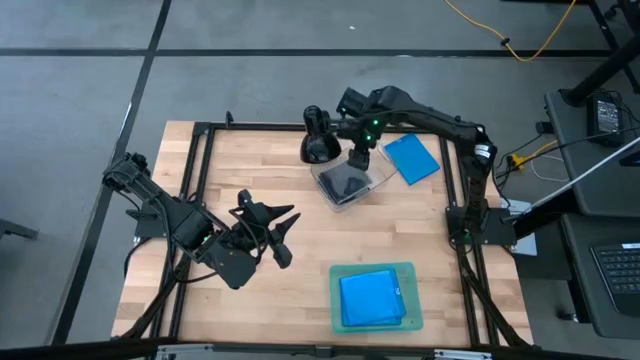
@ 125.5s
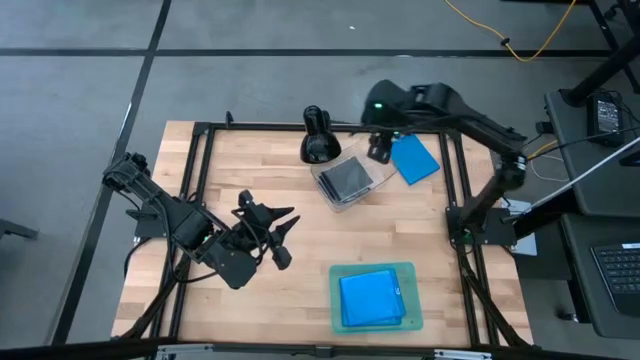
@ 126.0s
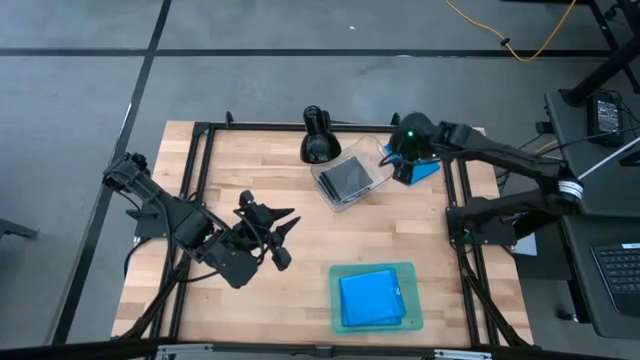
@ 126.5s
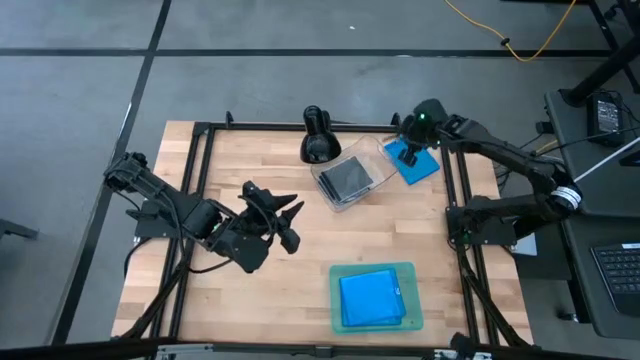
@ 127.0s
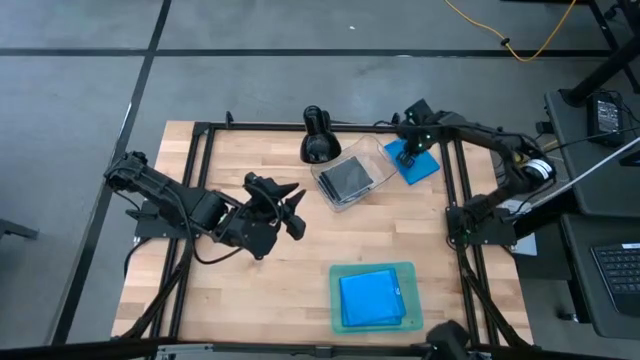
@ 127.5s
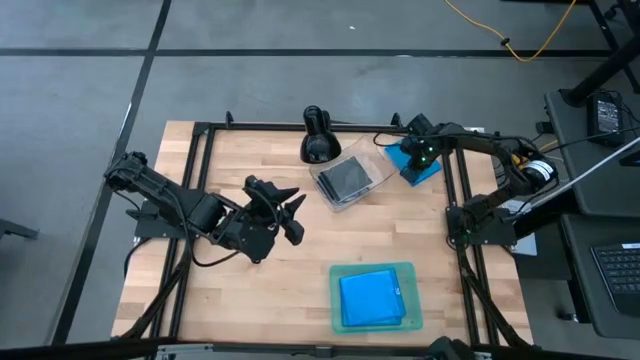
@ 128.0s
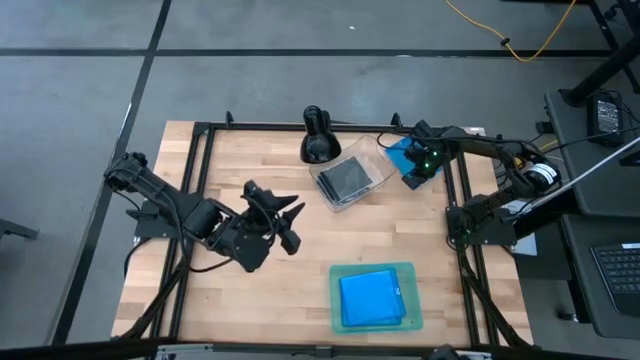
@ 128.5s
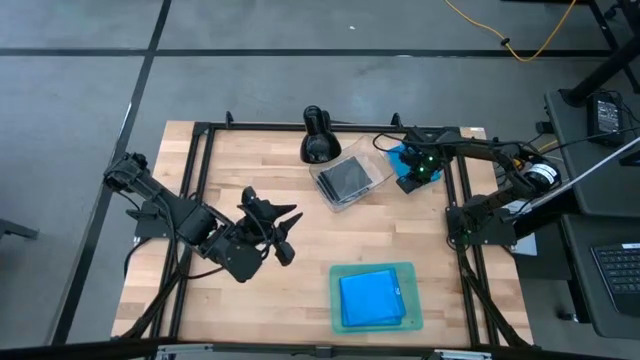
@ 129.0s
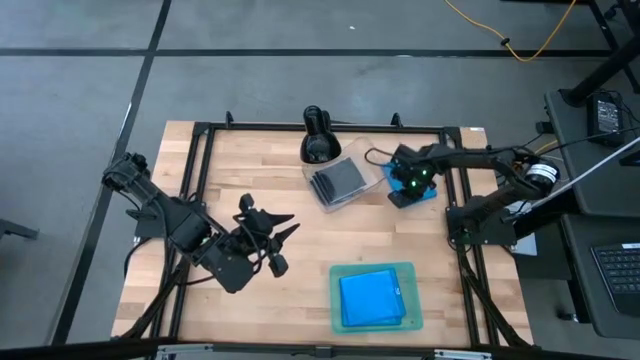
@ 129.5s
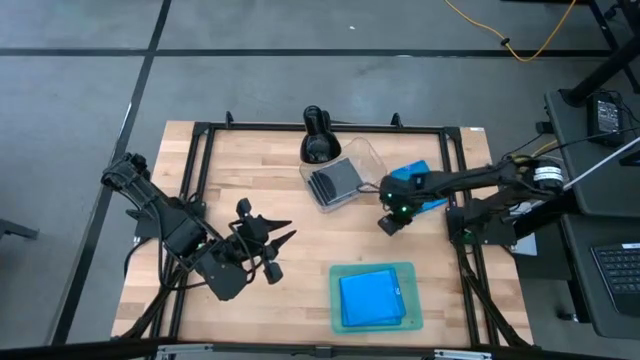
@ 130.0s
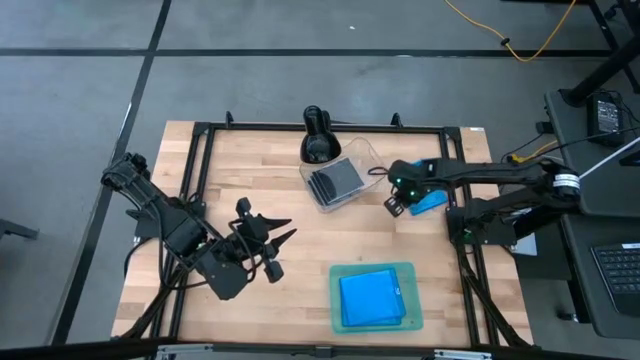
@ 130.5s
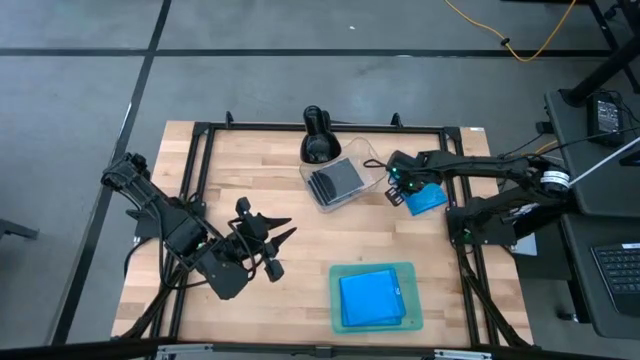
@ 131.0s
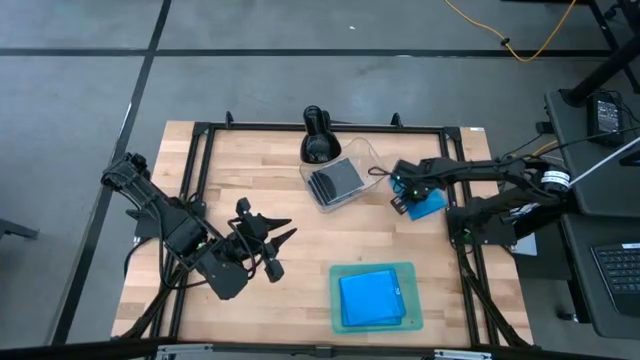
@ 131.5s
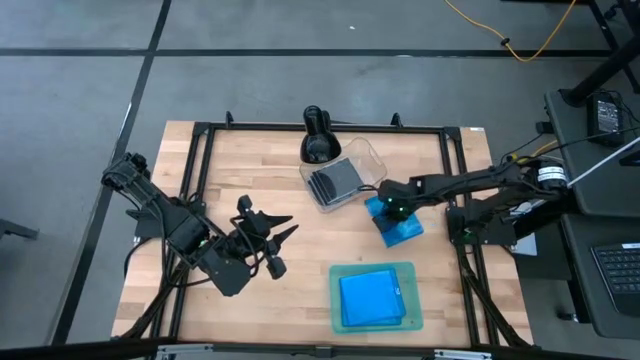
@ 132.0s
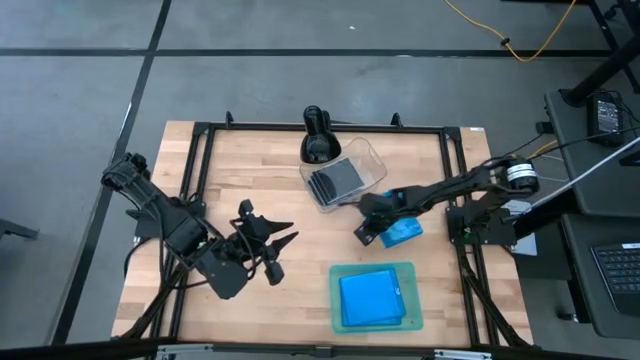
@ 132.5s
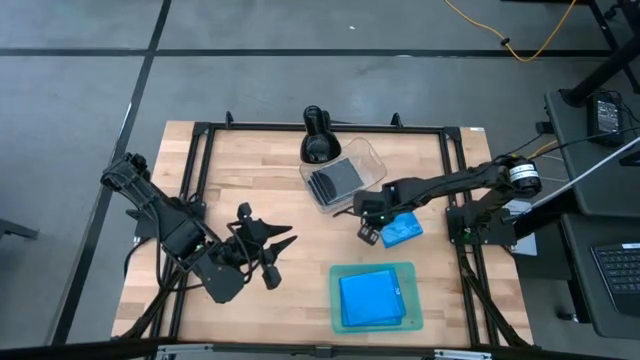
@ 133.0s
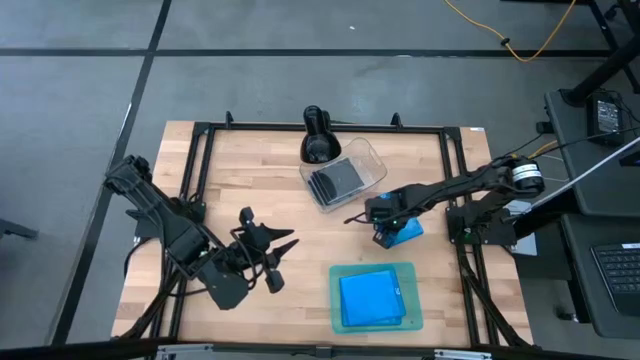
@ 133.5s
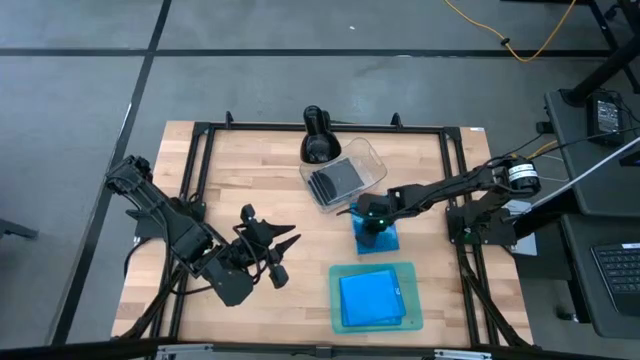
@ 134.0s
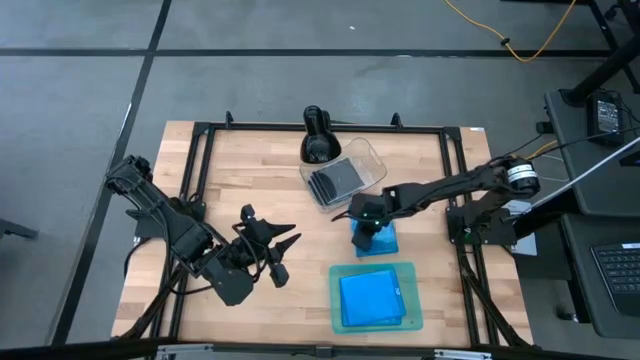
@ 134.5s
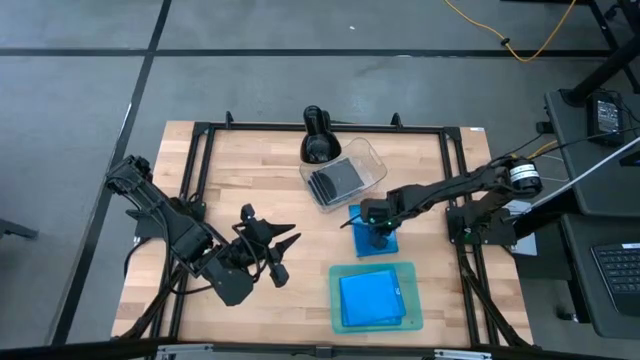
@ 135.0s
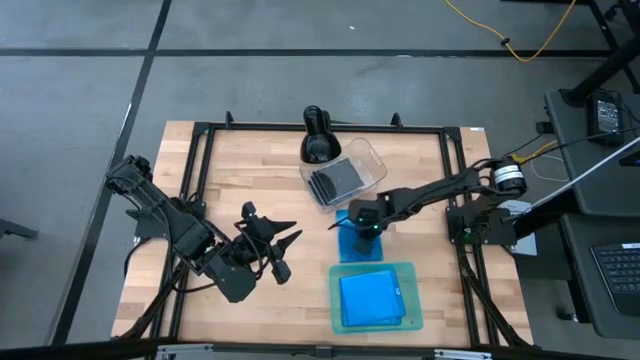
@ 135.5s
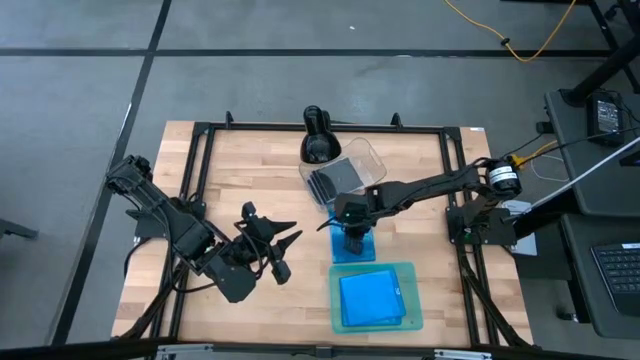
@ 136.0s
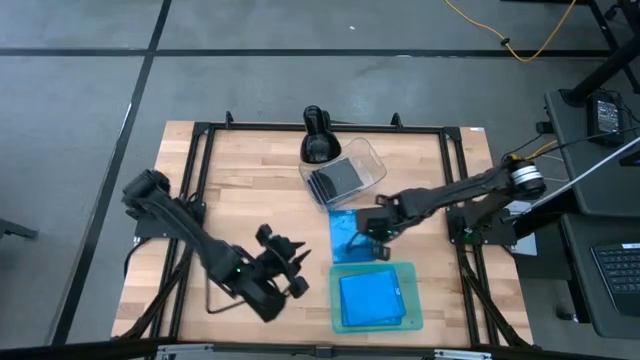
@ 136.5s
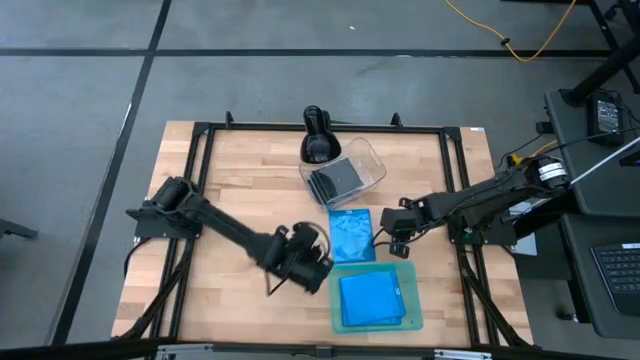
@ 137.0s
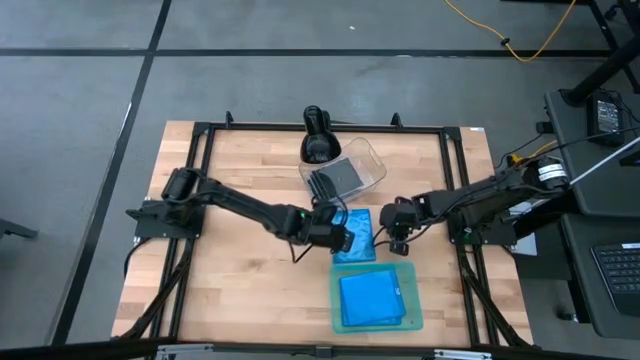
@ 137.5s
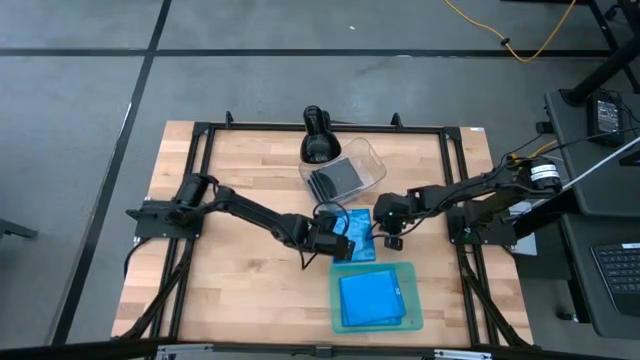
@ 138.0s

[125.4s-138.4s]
Task: Pick & place jewel cases by type
Put the blue CD case into the light green bin

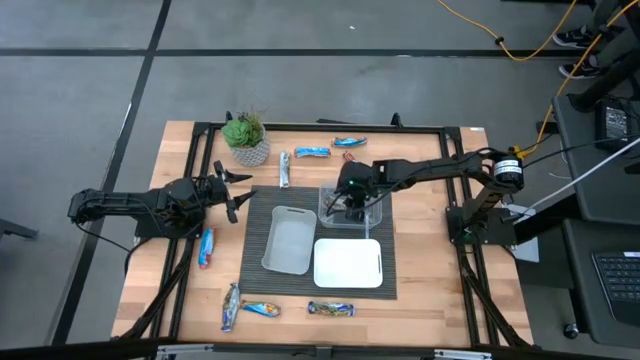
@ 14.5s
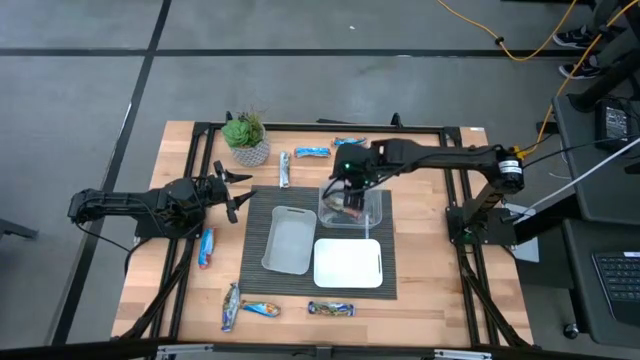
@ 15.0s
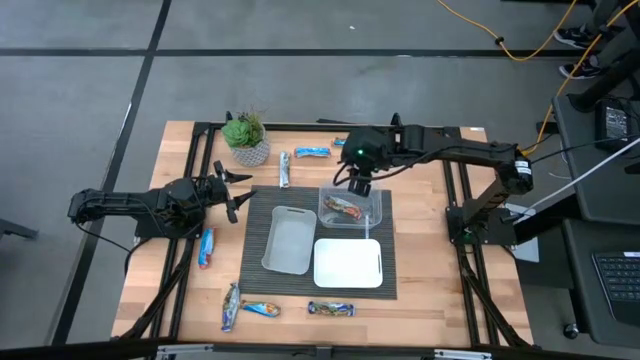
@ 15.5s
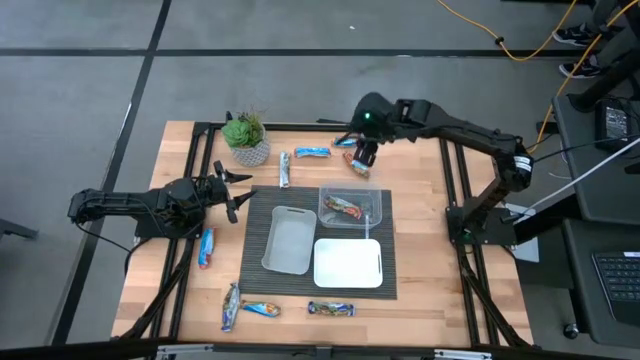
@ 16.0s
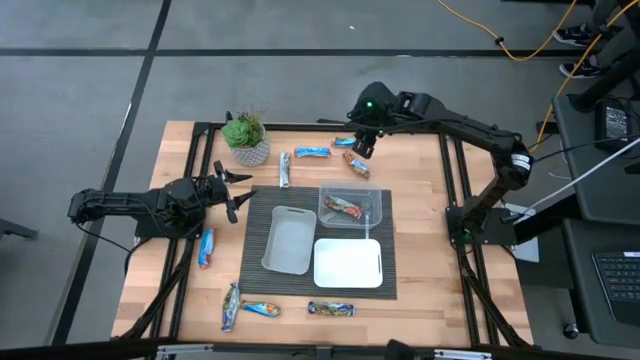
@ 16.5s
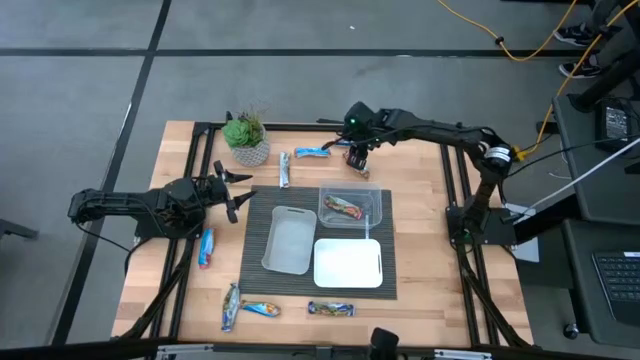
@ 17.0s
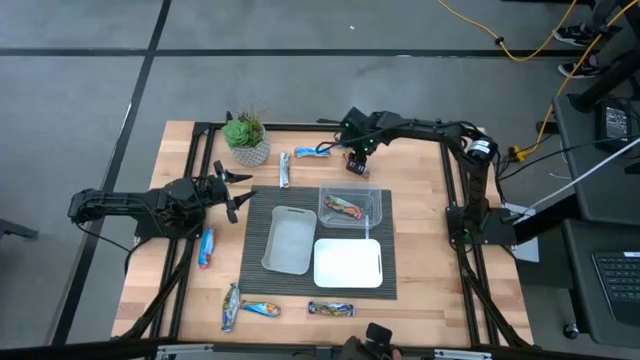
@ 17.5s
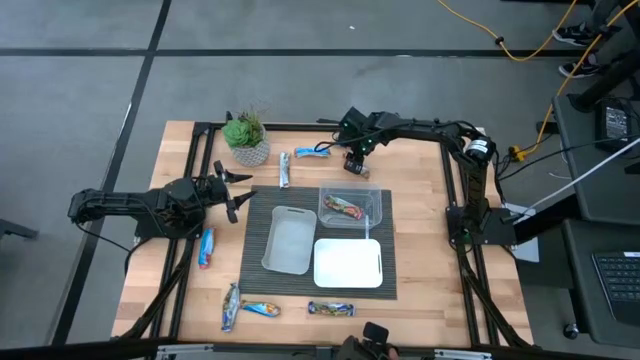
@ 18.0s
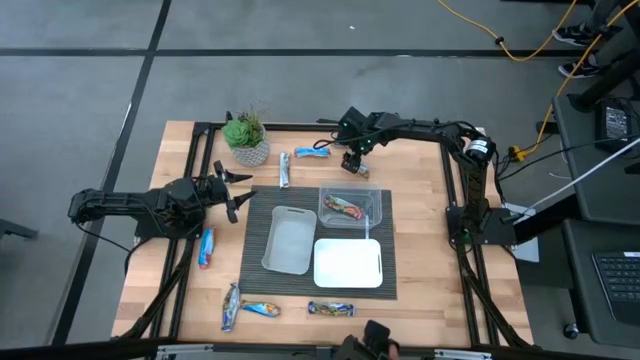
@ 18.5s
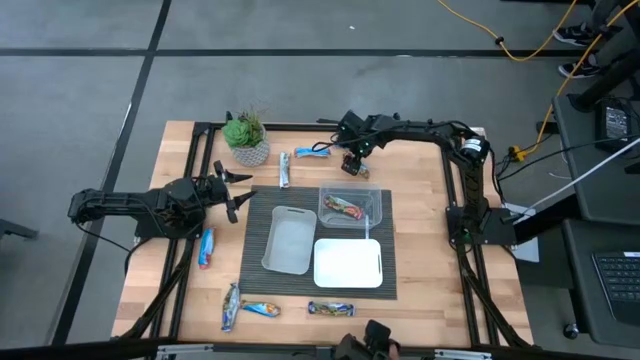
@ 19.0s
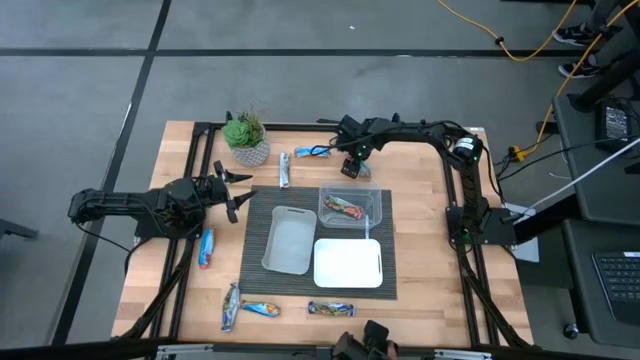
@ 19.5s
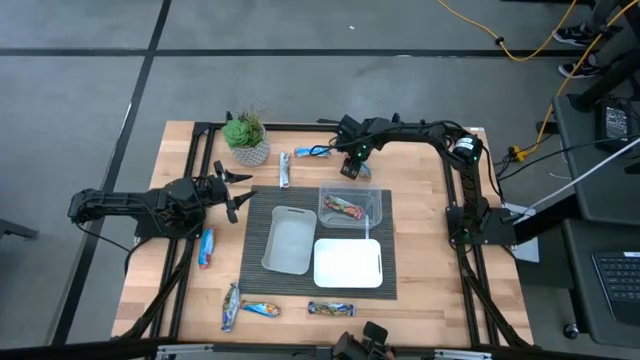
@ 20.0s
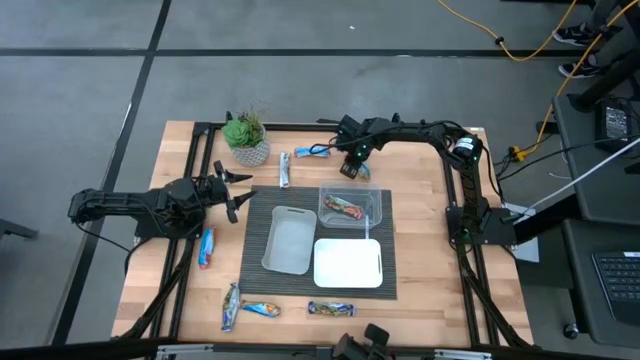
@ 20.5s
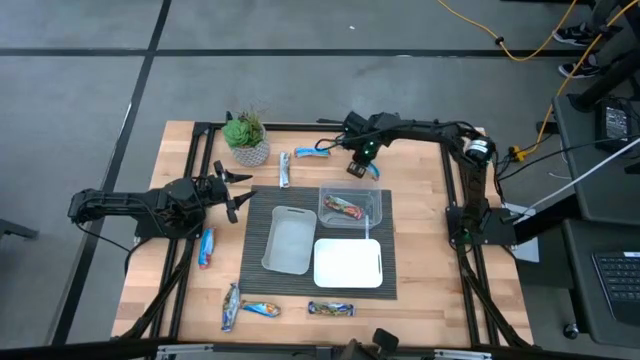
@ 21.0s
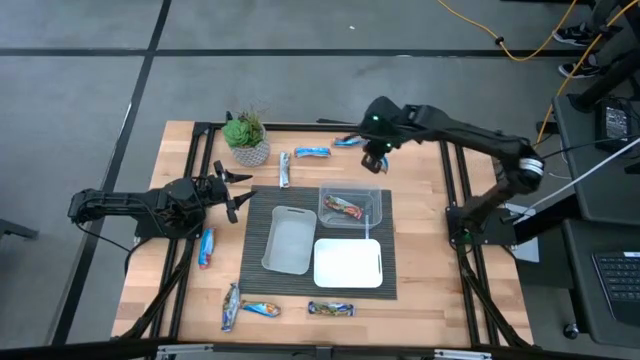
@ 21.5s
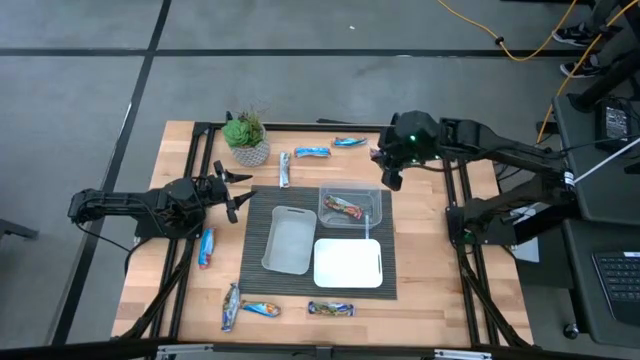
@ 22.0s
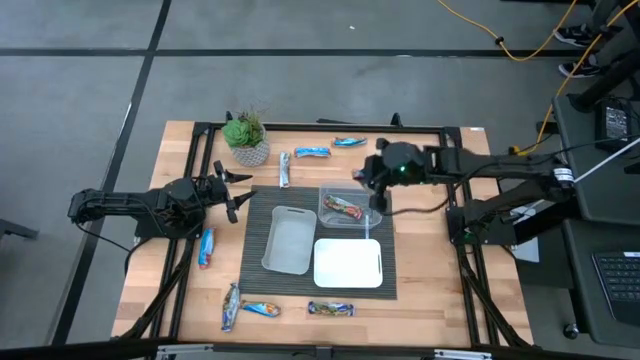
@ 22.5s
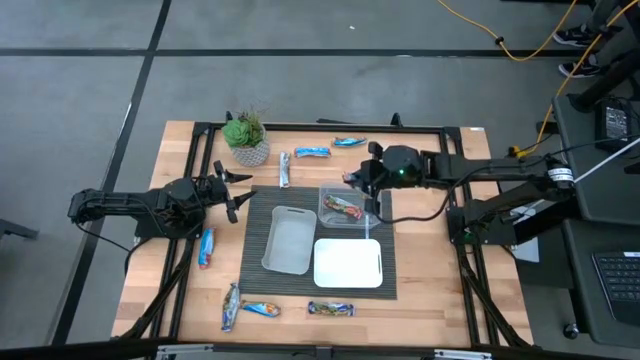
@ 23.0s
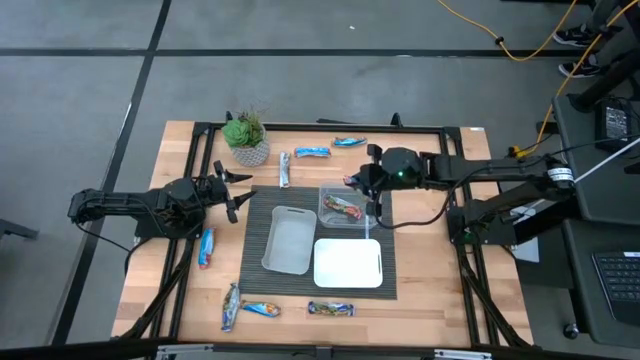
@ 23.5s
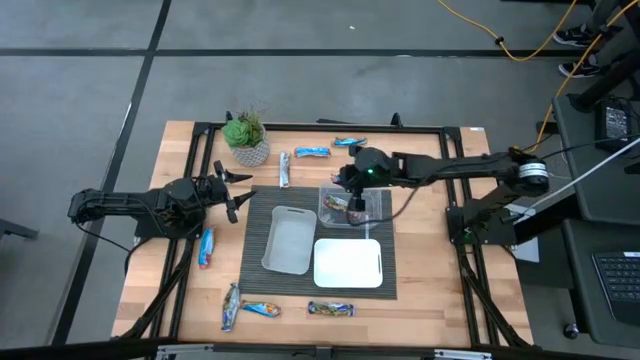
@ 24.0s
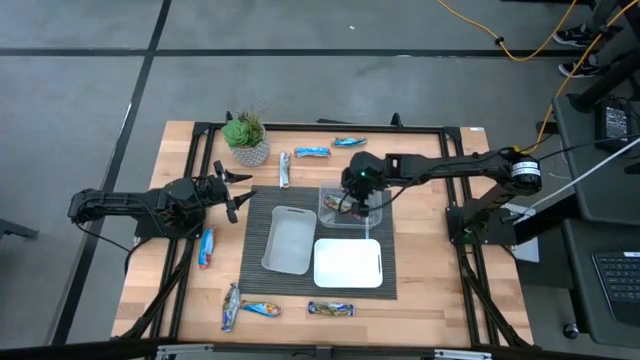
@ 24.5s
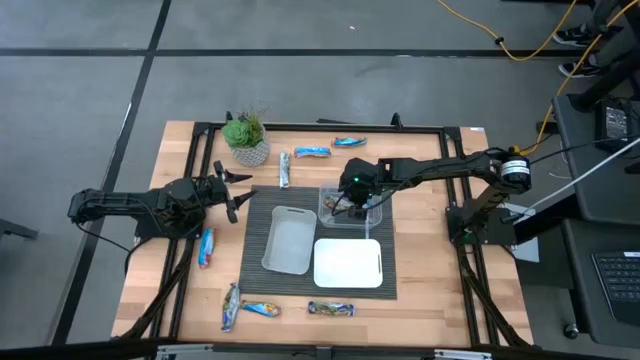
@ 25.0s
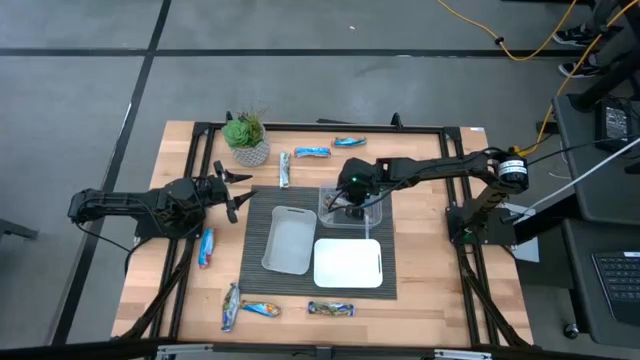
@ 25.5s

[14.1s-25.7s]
Task: Pick and place Granola Bars by type
Put the red granola bar into the transparent bin
